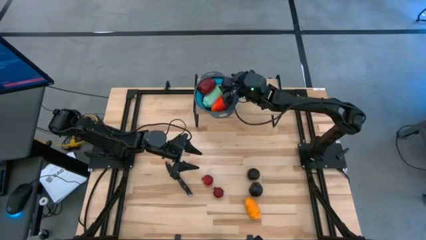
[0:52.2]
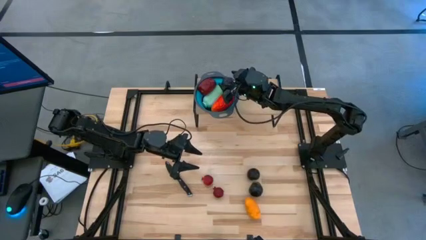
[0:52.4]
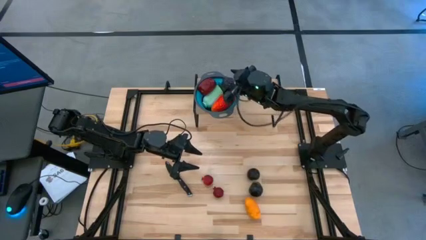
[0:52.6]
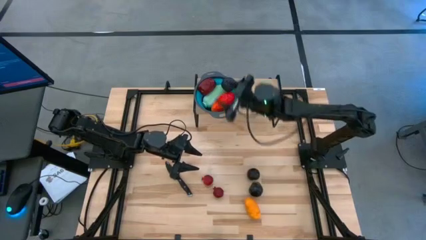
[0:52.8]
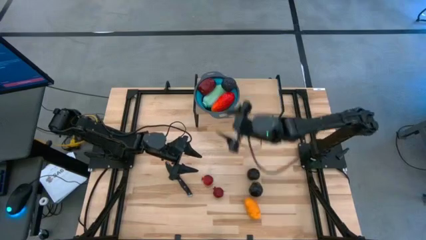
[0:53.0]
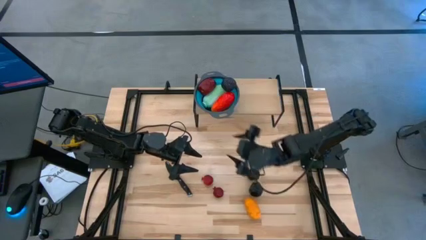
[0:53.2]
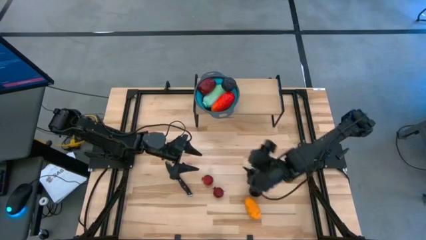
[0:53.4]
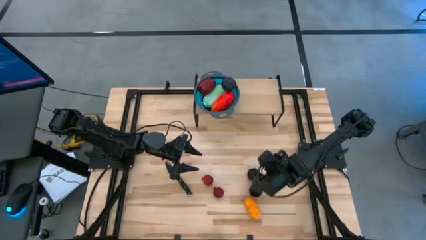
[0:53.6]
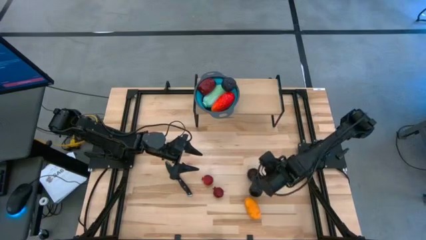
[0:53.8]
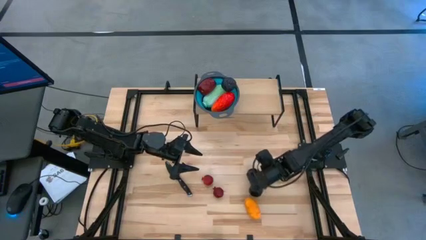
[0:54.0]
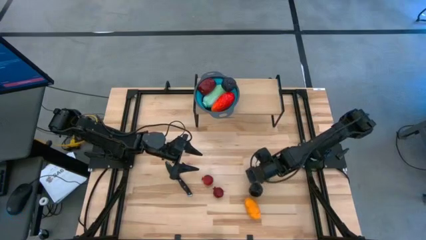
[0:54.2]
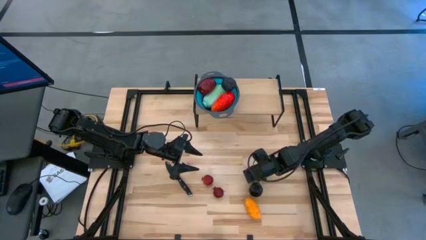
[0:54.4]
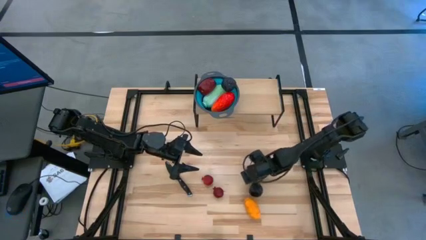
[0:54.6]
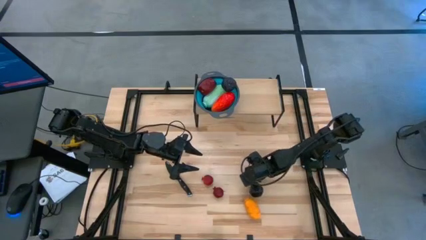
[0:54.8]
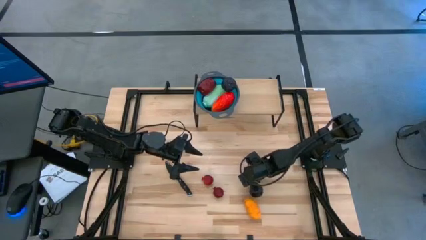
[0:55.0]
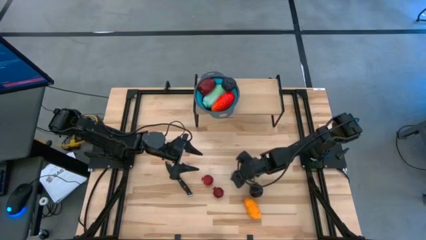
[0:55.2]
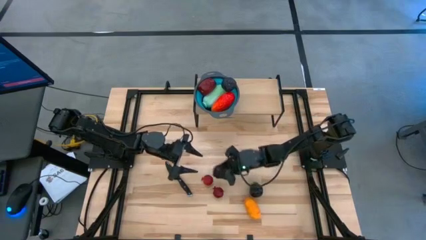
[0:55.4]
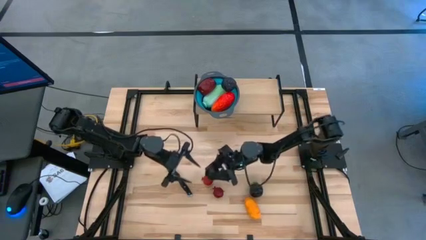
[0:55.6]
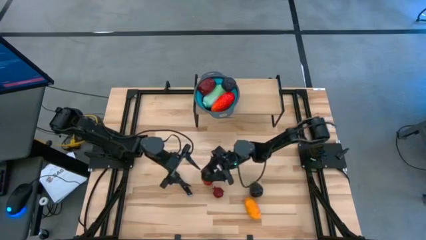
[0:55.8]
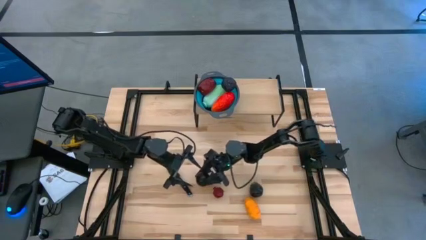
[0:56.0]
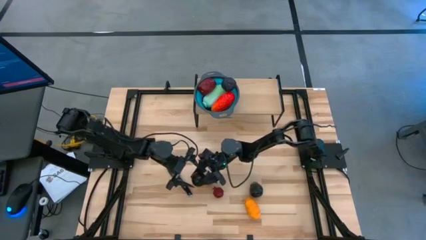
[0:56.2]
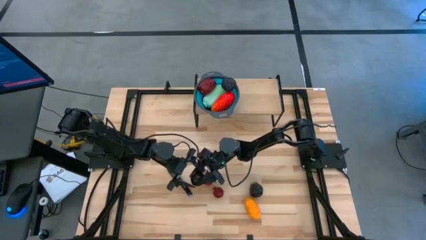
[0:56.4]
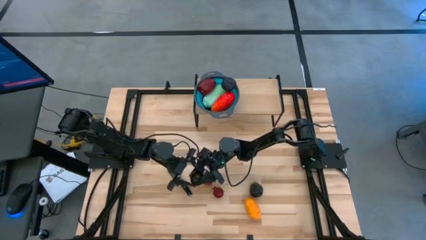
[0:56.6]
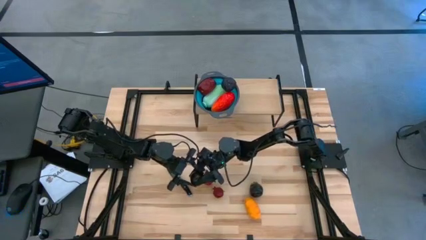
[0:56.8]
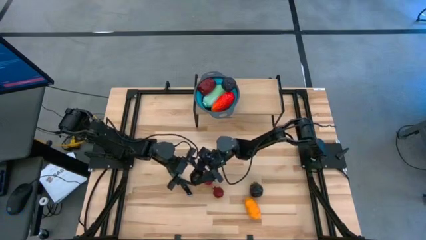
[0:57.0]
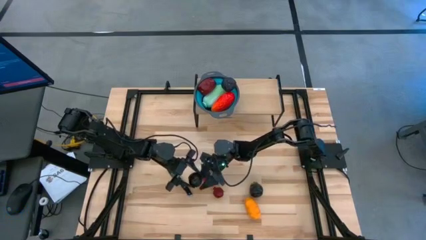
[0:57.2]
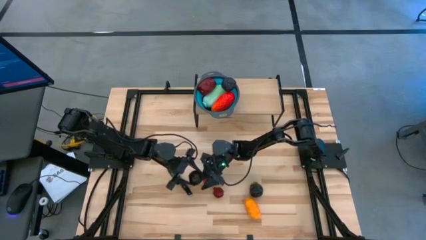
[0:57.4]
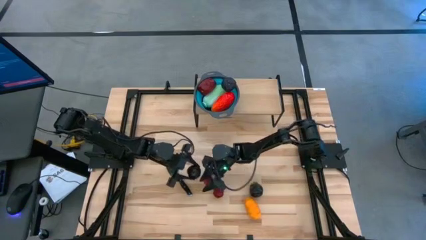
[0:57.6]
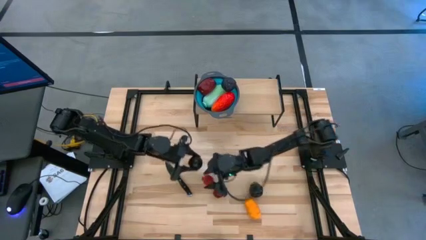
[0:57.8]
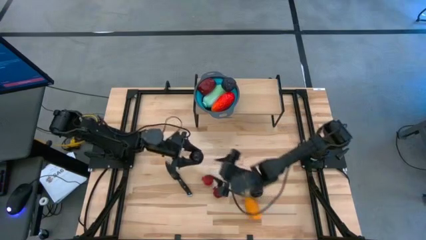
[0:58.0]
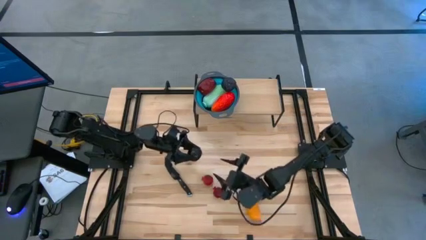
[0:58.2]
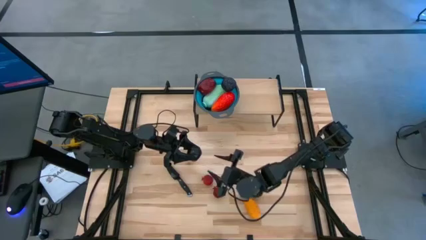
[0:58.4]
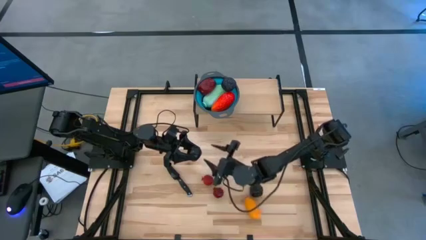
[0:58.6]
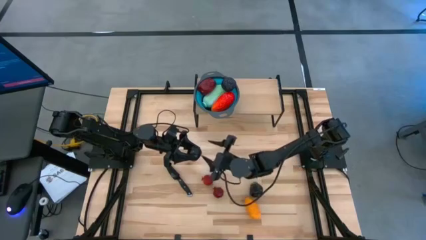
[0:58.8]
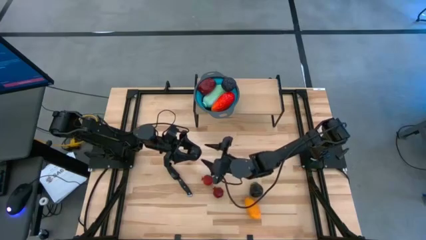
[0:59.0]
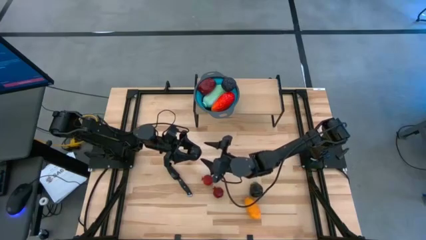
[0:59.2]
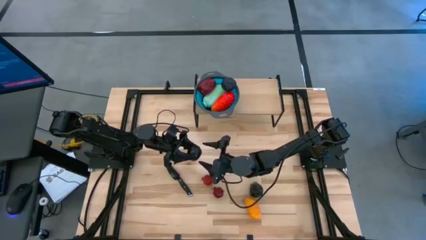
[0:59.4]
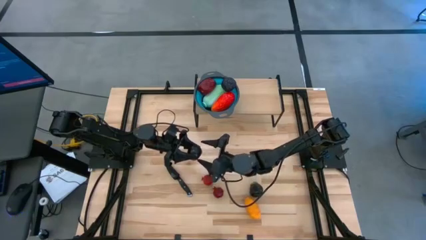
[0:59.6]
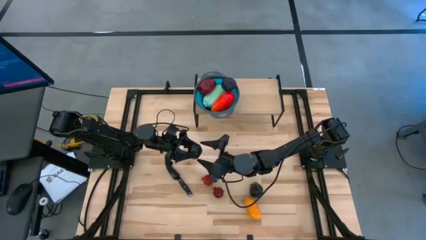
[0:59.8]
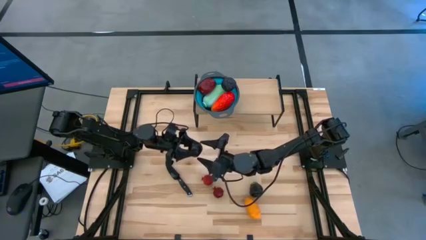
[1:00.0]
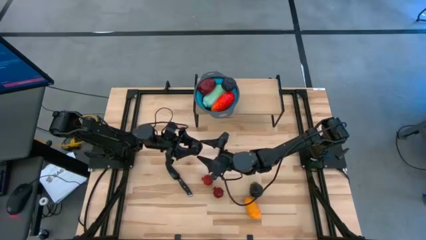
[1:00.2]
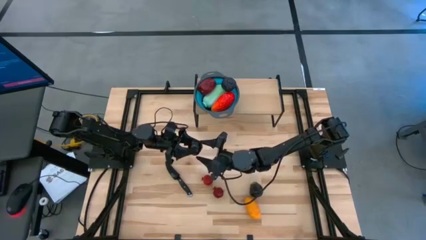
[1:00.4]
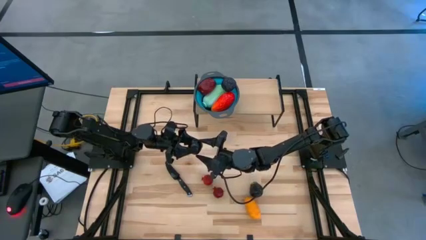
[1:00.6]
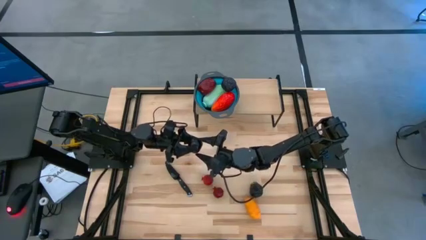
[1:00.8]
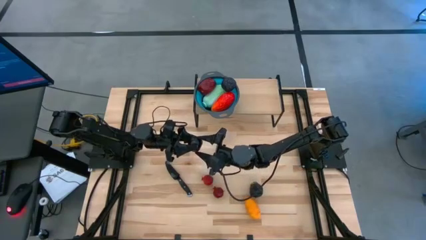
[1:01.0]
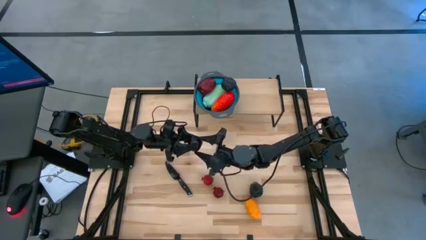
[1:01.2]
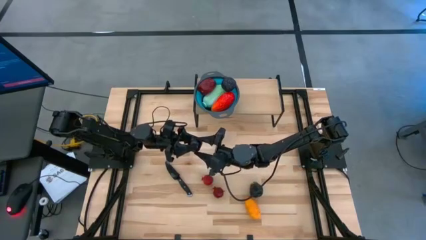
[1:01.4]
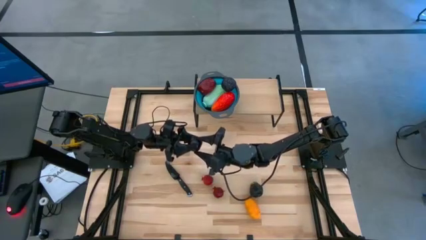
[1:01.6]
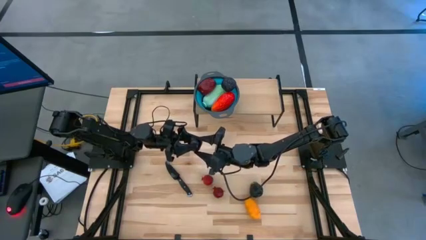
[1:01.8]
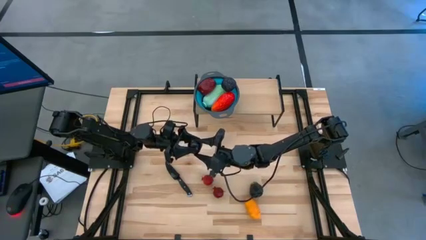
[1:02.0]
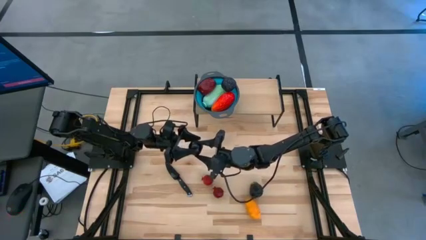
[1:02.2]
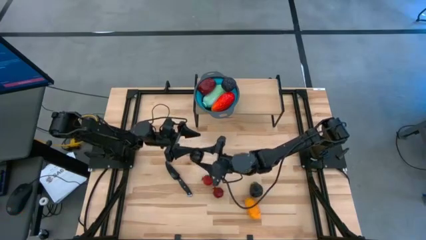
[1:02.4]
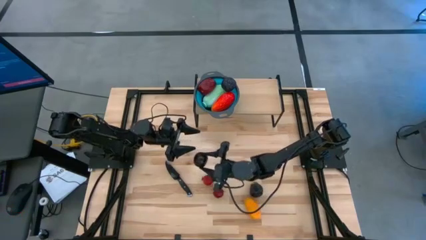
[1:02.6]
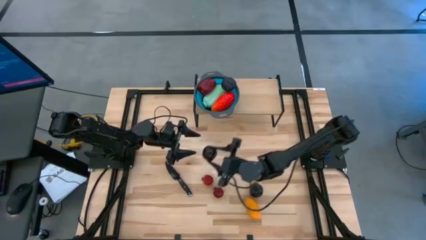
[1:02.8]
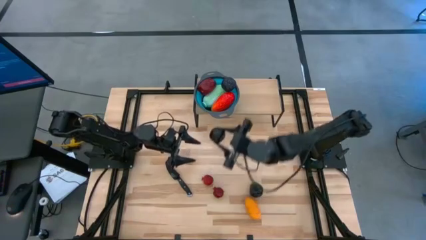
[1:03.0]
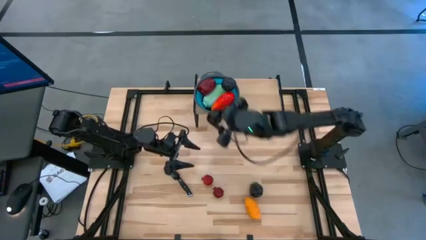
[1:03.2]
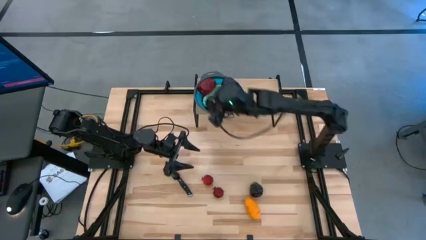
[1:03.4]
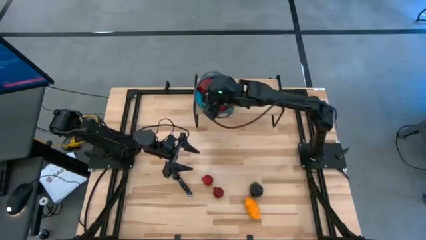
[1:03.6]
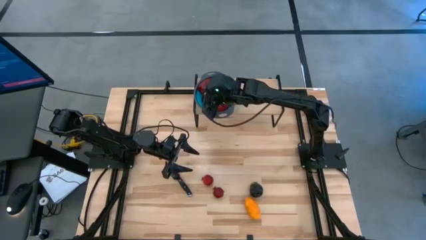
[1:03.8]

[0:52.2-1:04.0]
Task: Pick & Place Fruit
Put the black plum into the blue strainer bowl on the shelf

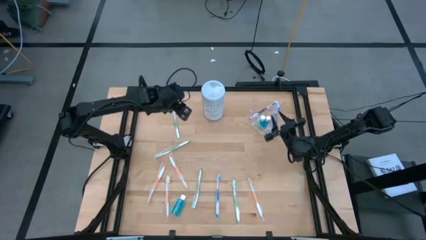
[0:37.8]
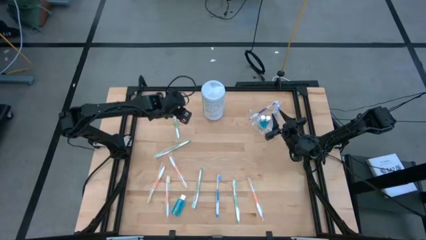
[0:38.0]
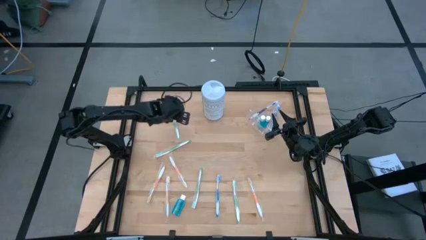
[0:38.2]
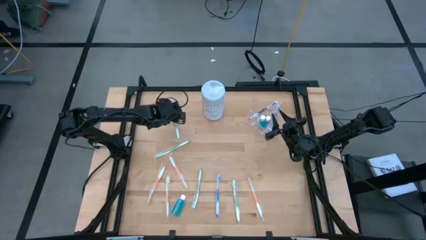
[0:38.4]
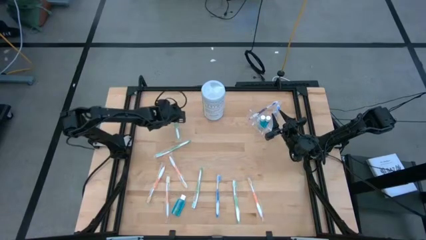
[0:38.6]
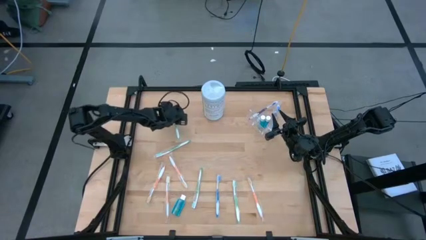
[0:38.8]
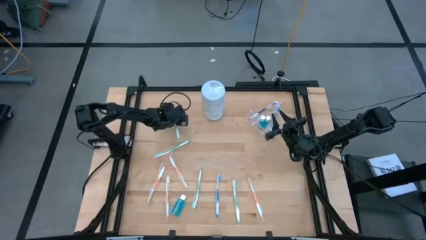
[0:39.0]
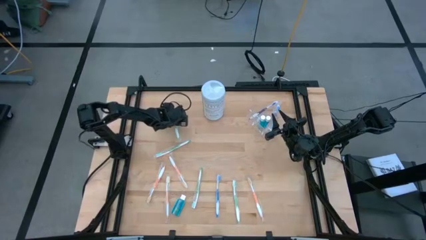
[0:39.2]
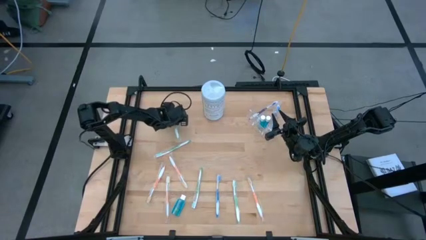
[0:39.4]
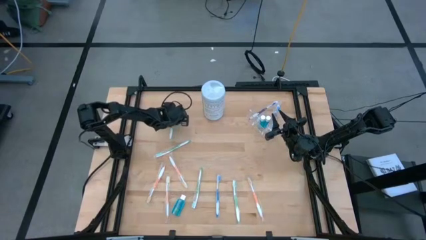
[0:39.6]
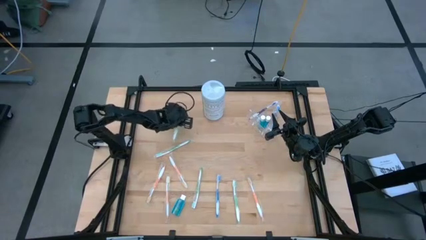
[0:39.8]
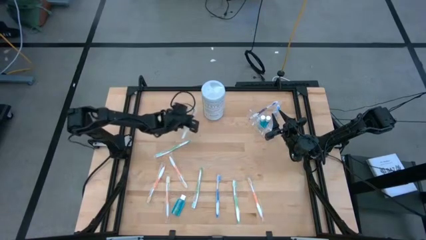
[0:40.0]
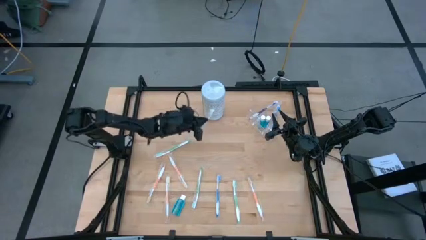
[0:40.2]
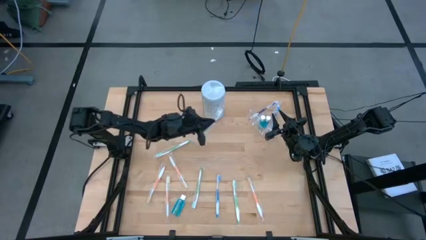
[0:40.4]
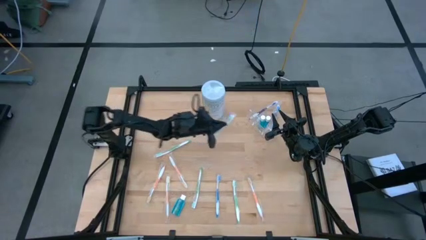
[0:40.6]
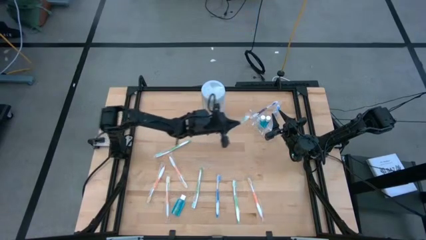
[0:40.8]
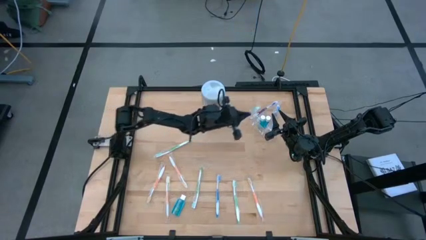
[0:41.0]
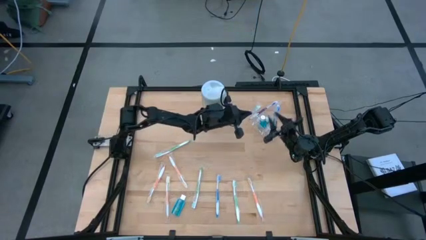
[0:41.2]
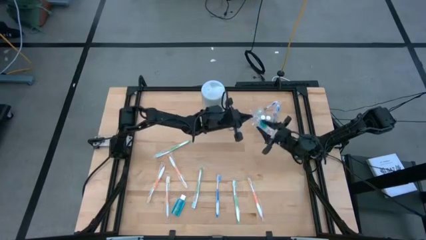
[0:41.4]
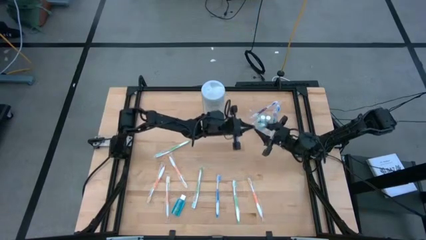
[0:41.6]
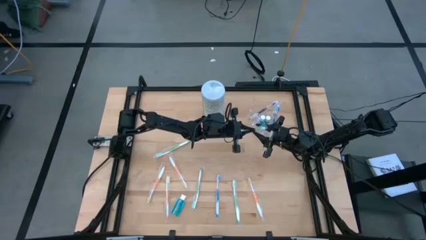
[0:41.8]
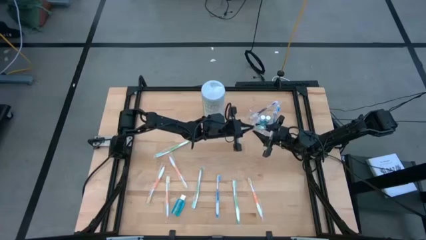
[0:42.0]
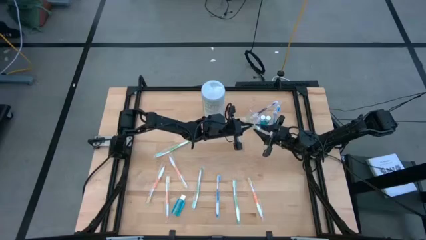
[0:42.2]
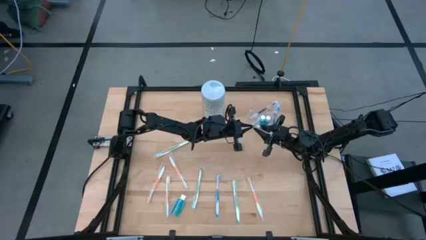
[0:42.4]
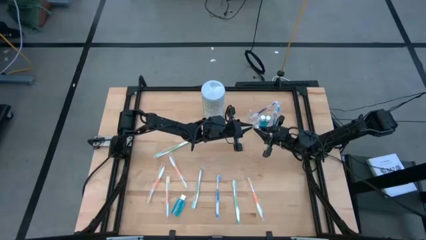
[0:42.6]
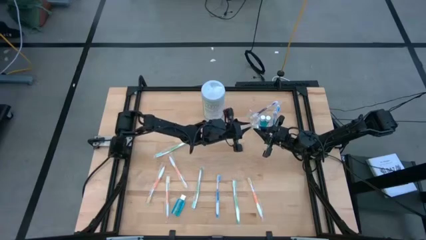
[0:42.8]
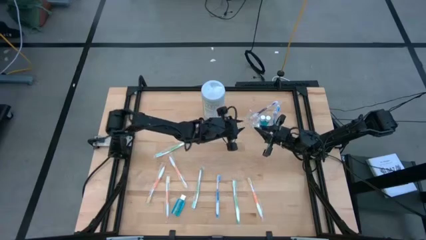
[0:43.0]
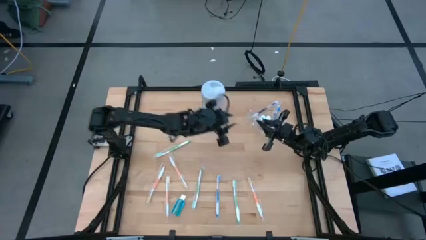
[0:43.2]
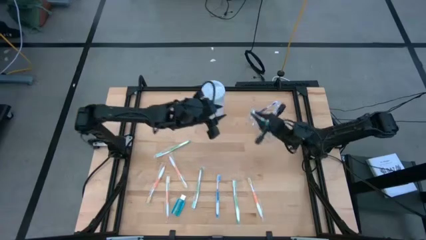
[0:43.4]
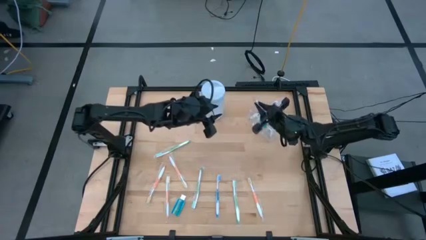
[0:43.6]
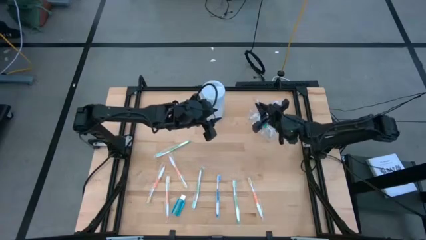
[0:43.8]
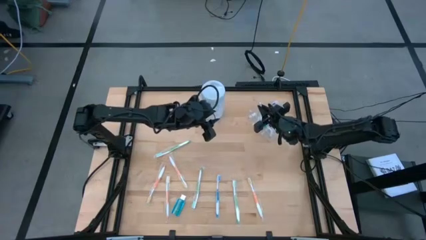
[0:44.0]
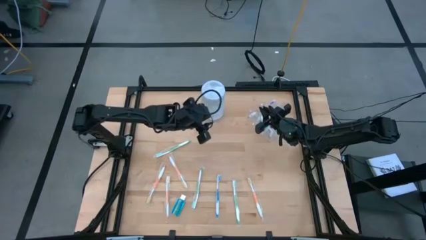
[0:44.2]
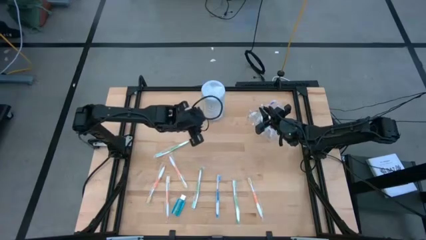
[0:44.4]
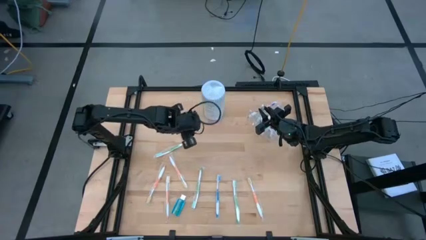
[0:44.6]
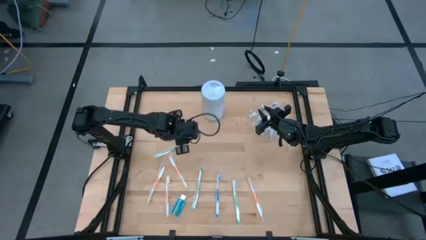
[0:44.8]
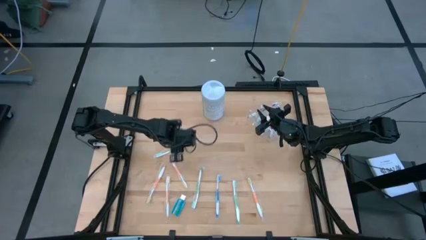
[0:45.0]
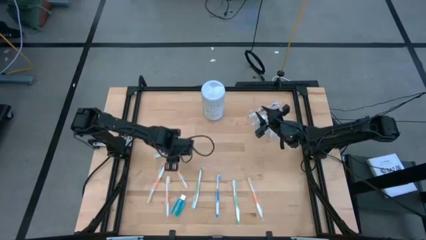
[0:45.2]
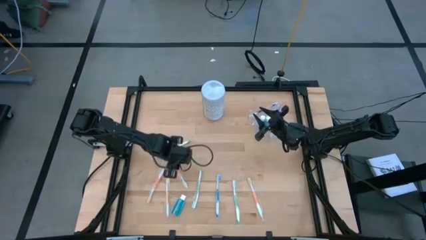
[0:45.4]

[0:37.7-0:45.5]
Task: Pick & Place toothbrushing station
Put the green toothbrush into the transparent organizer
